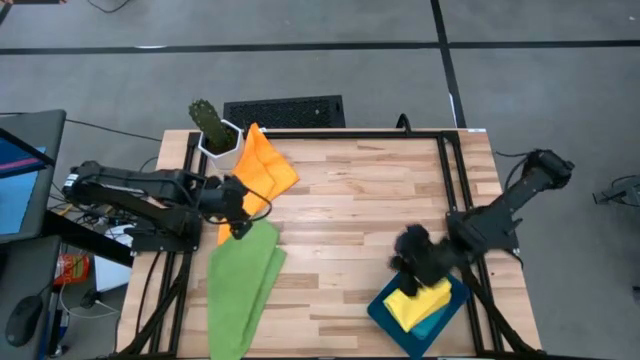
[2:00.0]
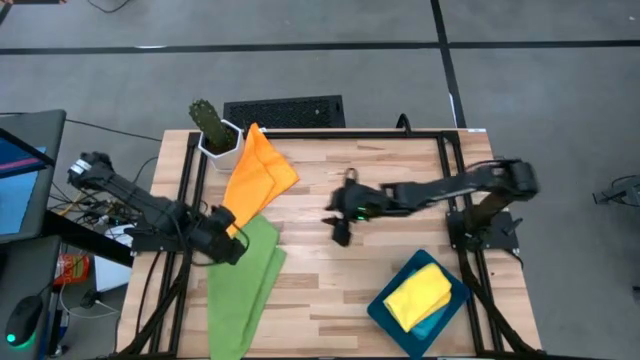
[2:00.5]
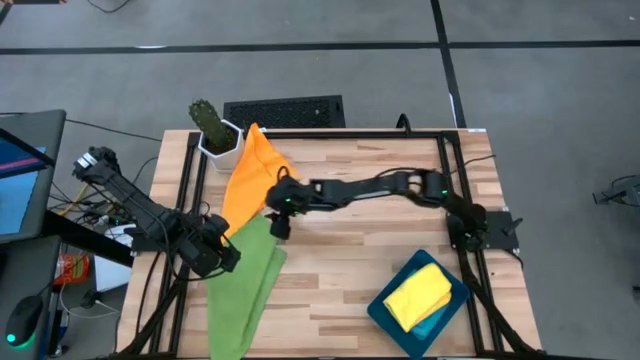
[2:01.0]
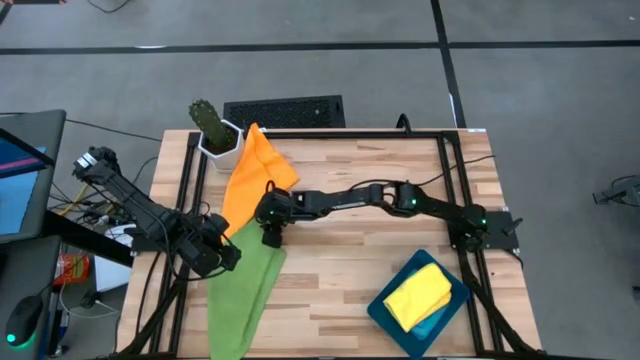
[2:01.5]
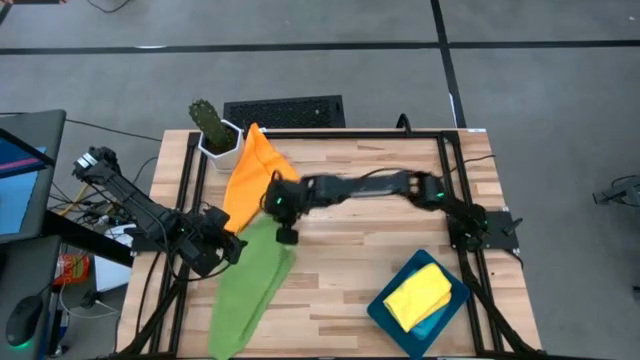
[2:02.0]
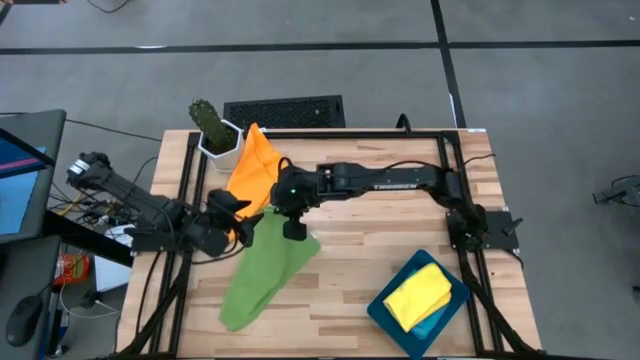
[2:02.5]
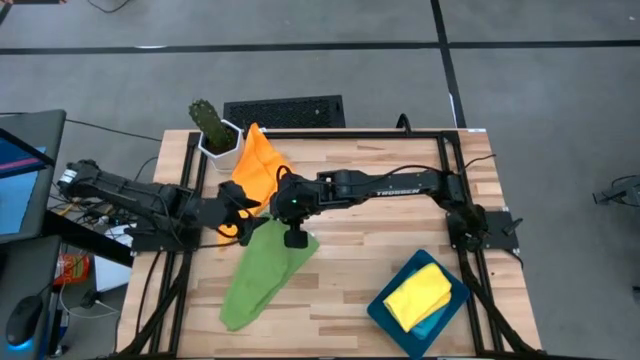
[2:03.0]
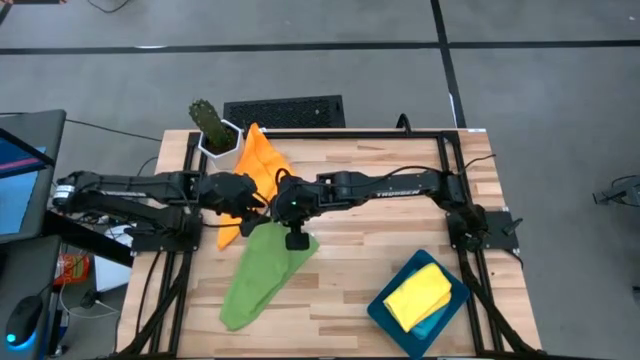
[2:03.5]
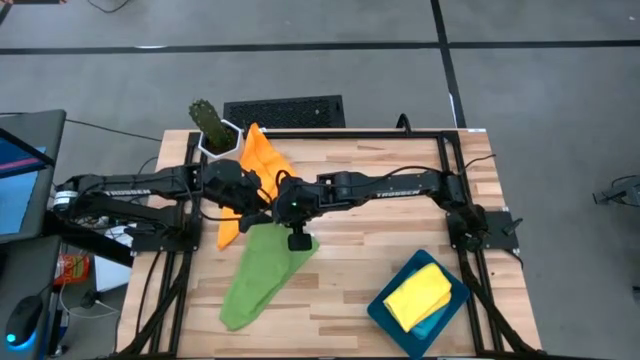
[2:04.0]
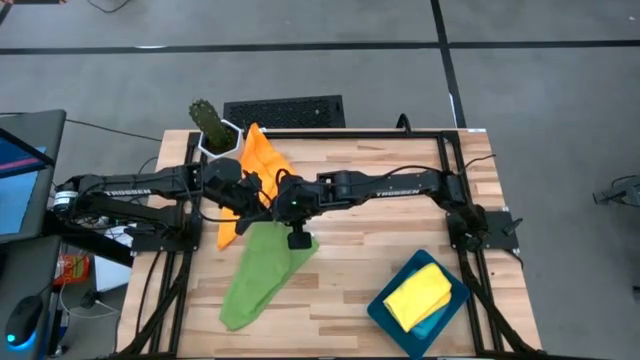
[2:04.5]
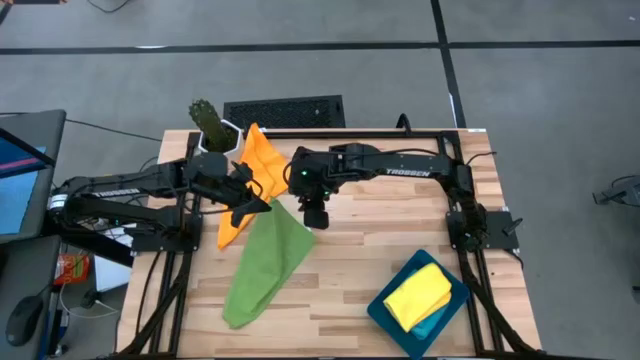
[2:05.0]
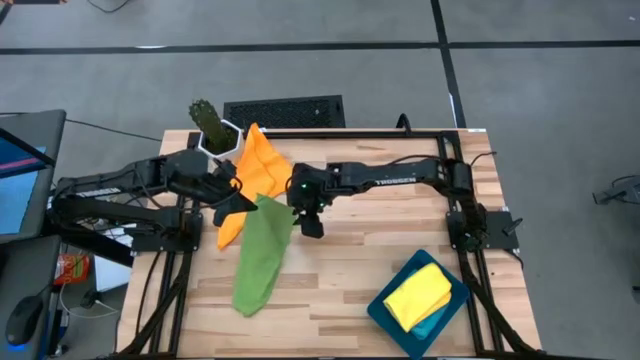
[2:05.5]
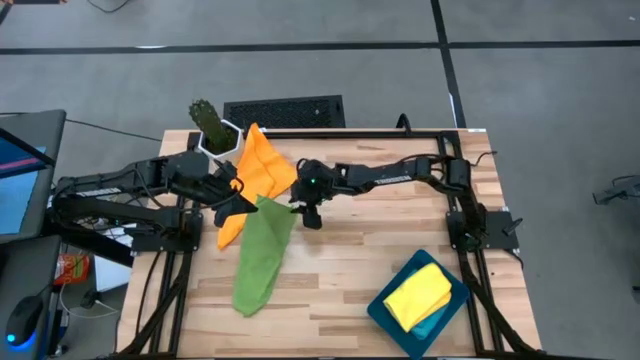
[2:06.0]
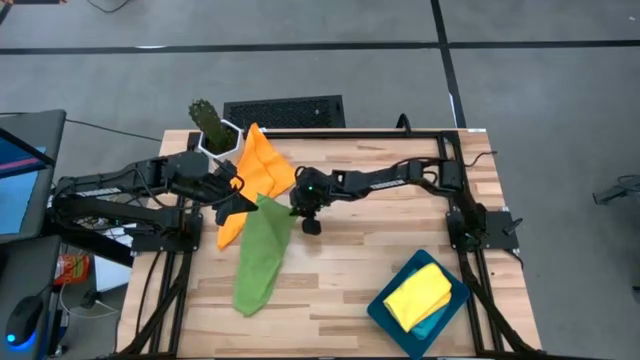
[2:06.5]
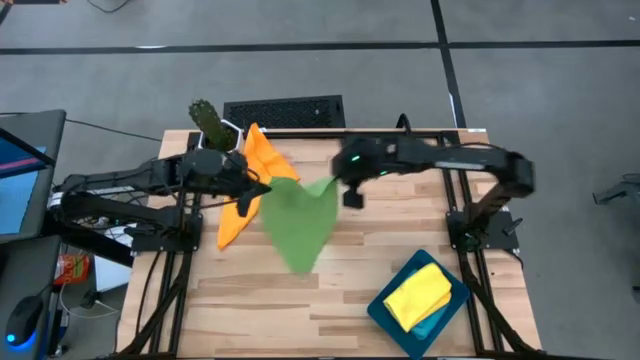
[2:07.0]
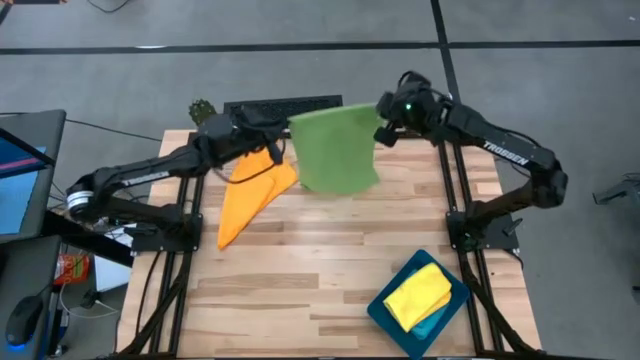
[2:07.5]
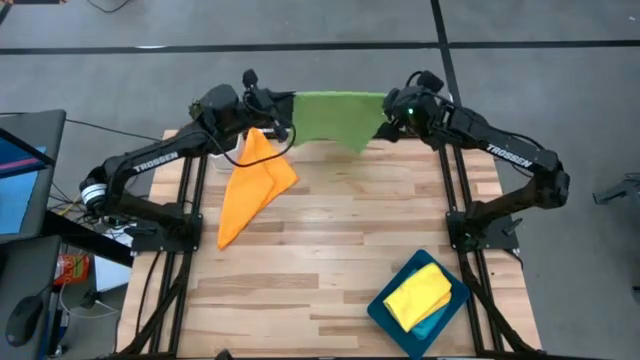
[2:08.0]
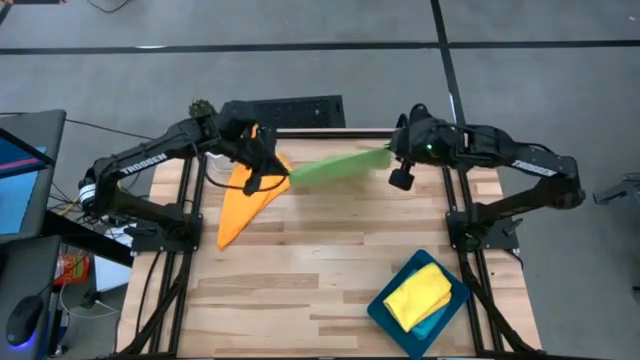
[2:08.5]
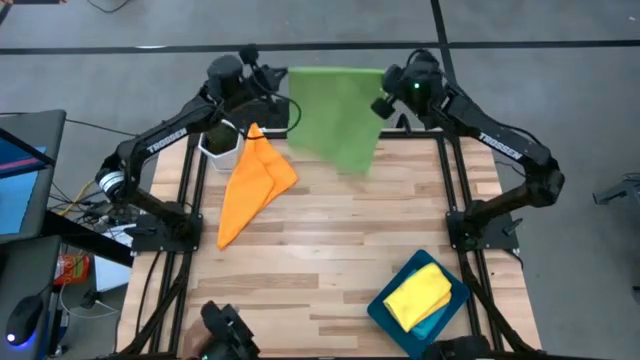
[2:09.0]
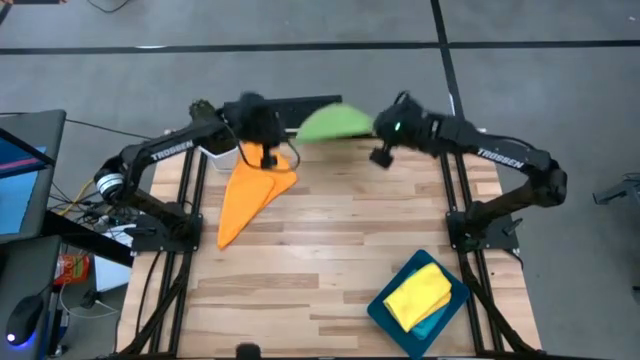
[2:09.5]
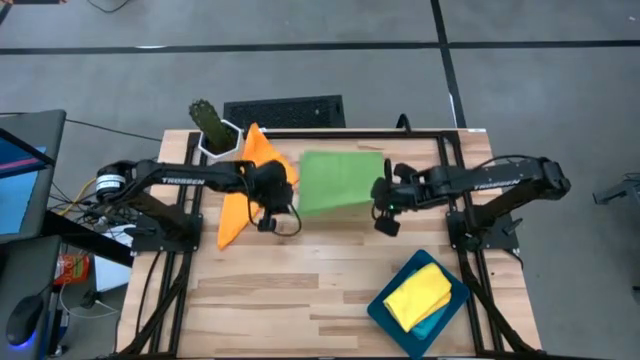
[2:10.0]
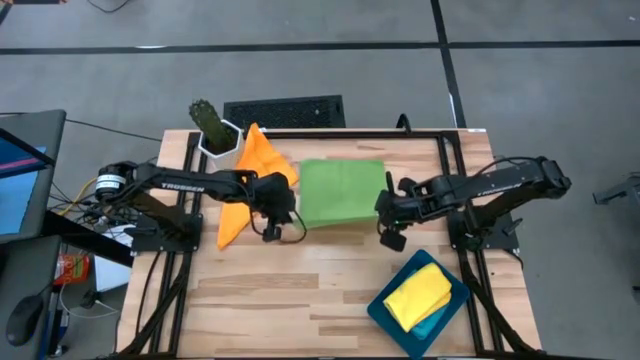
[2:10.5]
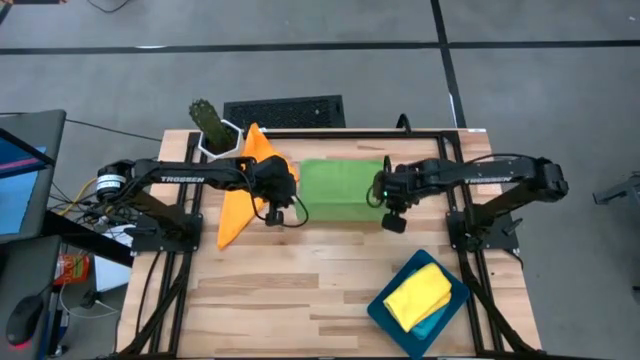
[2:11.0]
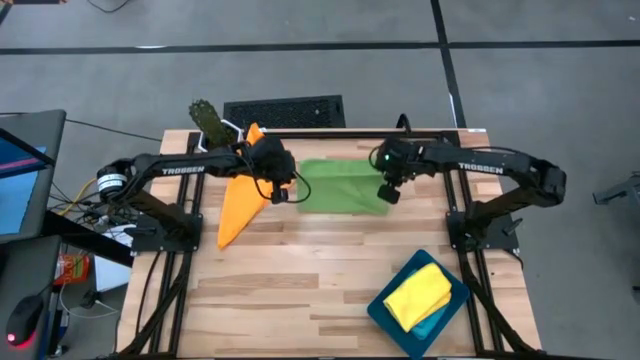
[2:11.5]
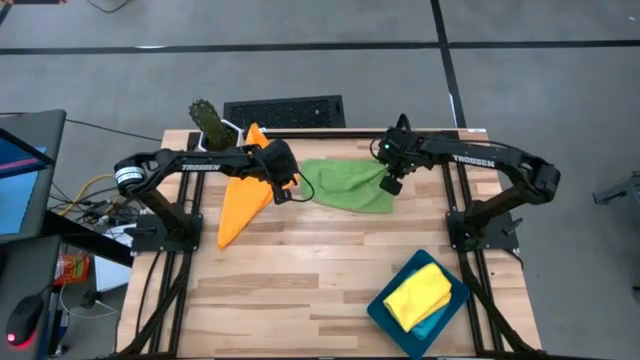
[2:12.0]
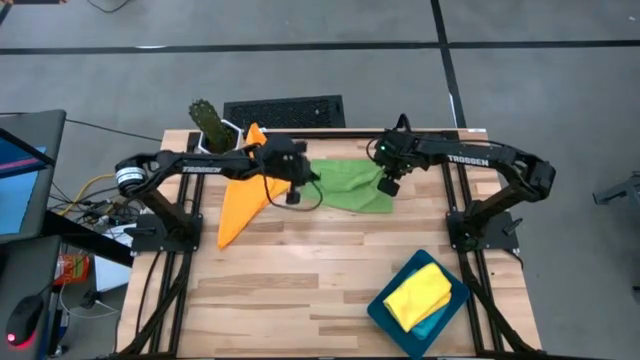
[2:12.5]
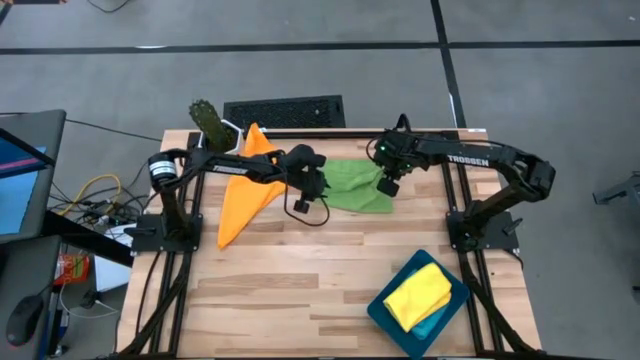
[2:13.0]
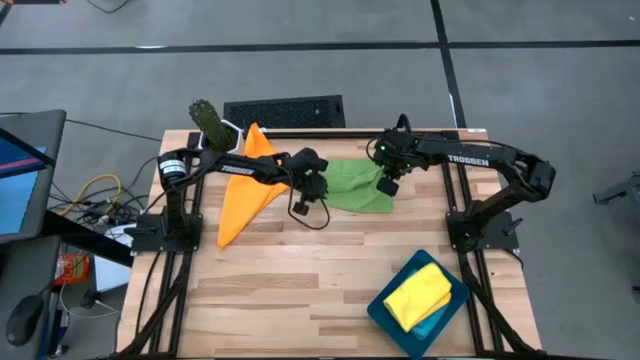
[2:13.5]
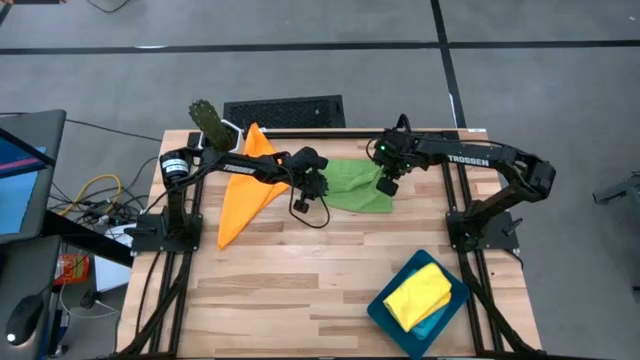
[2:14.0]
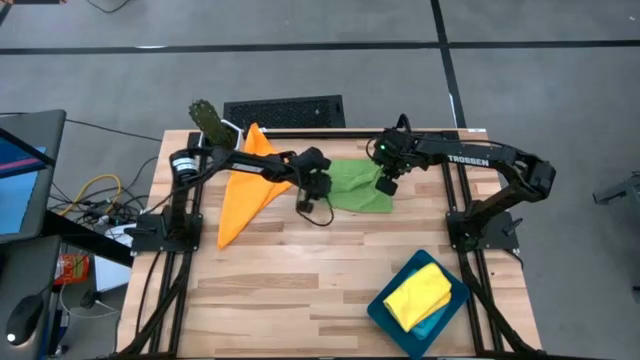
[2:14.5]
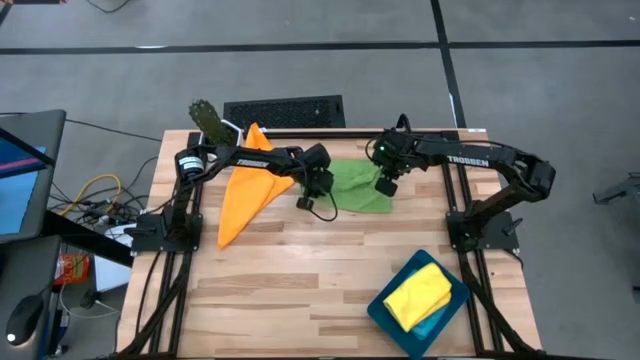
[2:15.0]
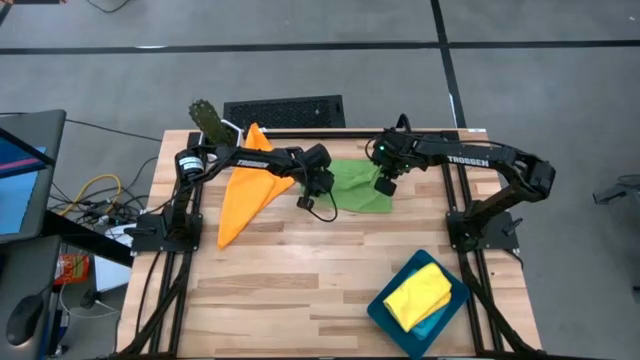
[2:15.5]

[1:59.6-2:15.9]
Task: Fold microfiber towels
Fold the green microfiber towel

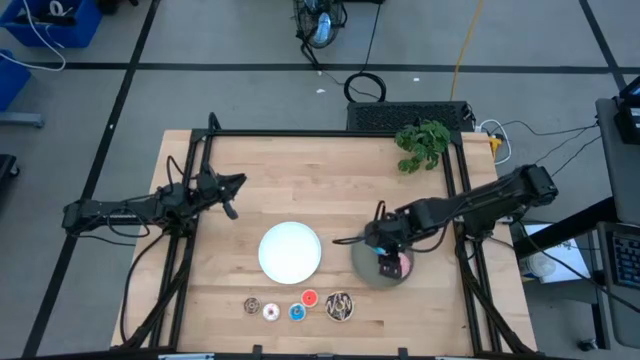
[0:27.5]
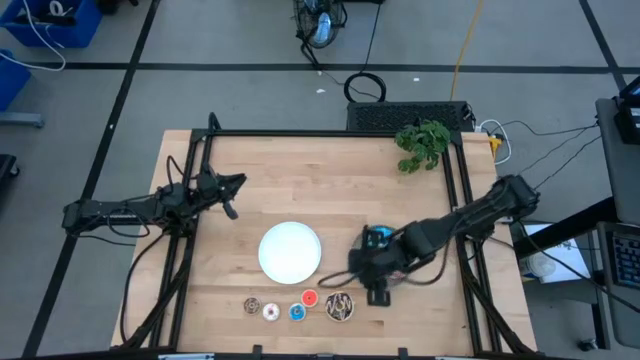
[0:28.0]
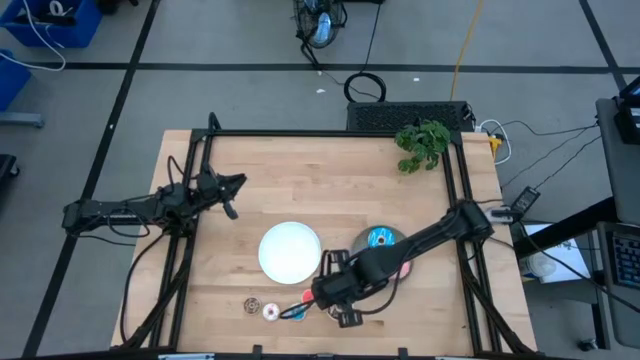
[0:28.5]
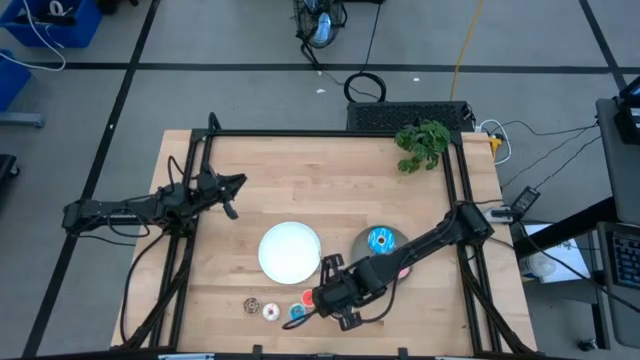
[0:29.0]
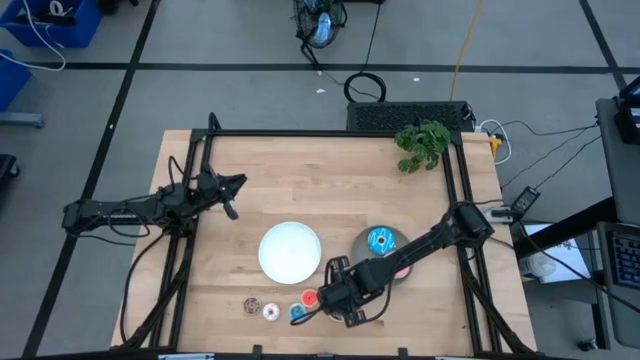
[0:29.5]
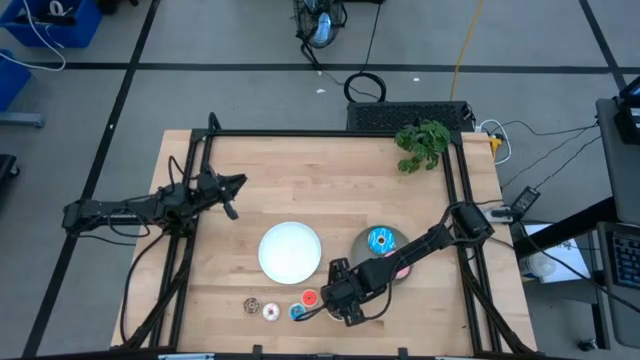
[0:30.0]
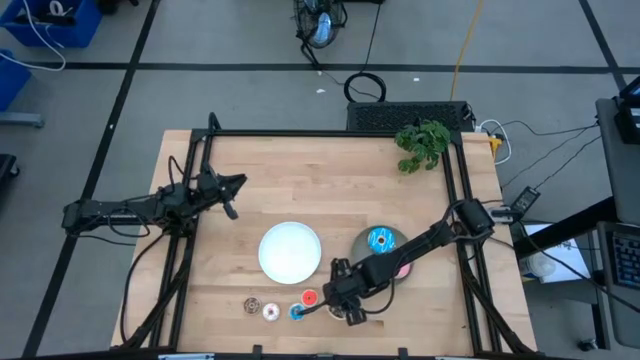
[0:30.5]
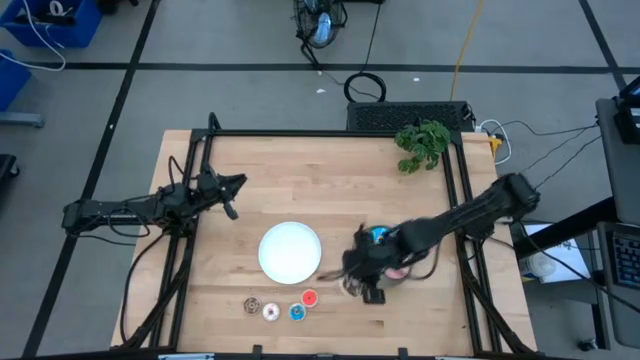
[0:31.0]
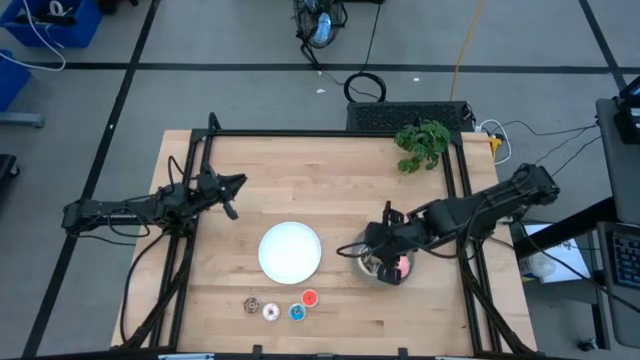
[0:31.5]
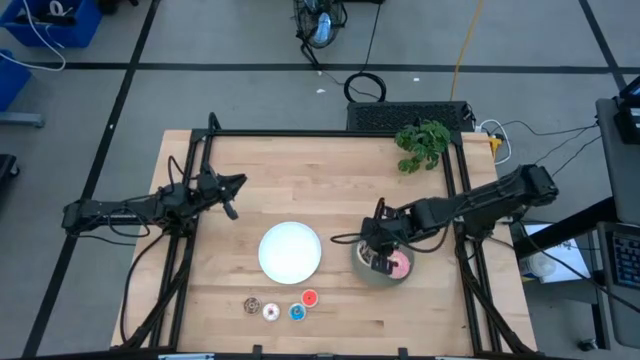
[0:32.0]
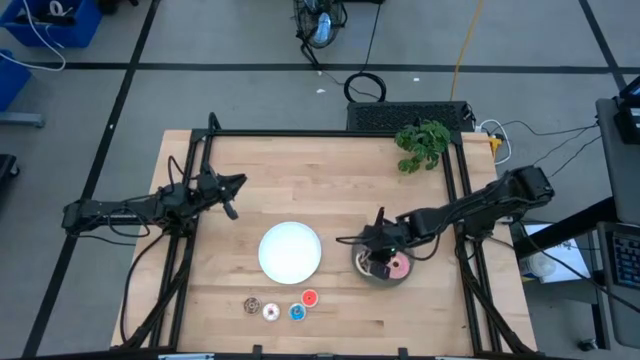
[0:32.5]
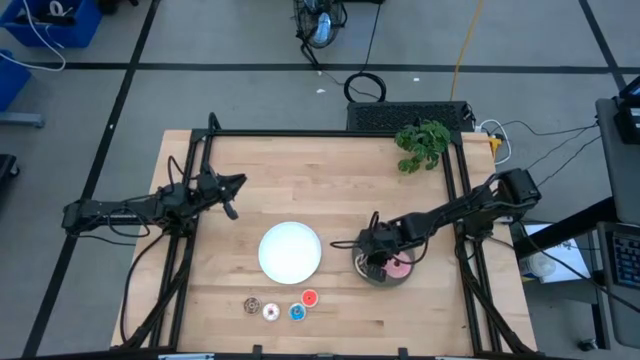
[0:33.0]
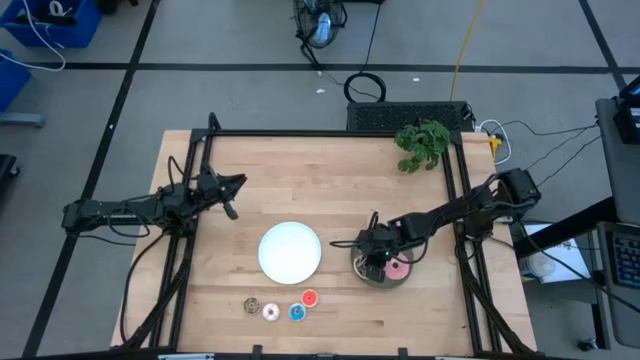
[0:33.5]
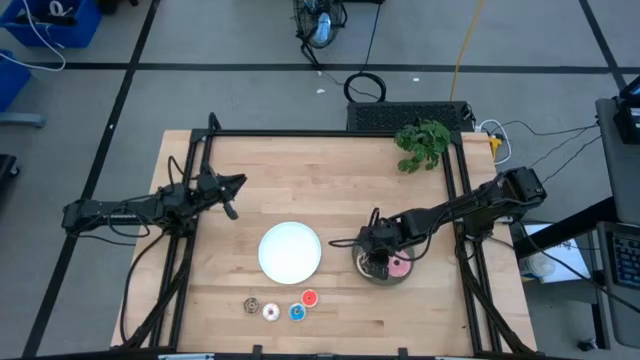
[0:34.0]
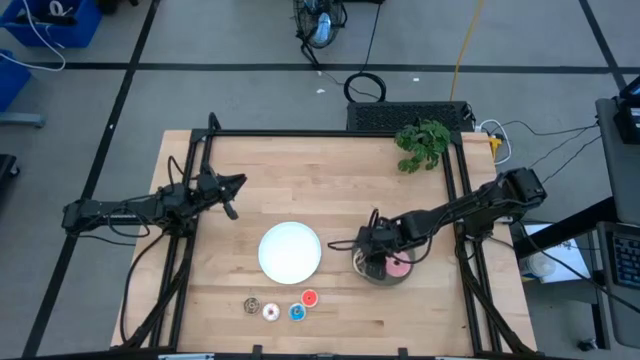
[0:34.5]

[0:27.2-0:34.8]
Task: Pick & Place donuts
Put the large black donut on the brown plate
